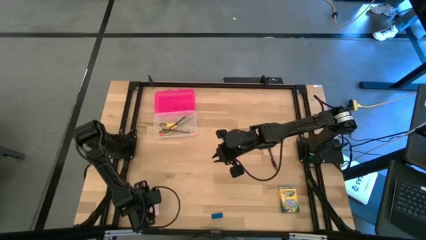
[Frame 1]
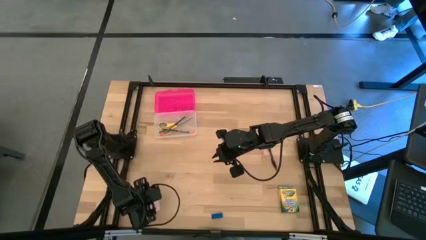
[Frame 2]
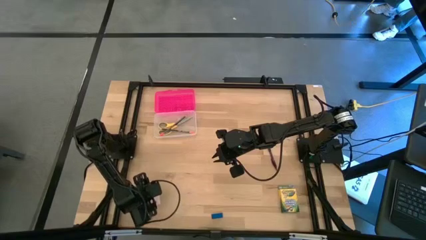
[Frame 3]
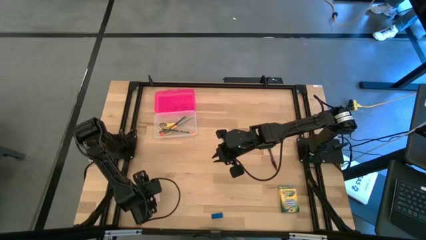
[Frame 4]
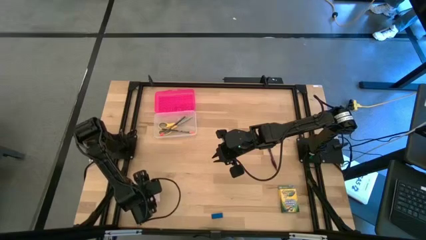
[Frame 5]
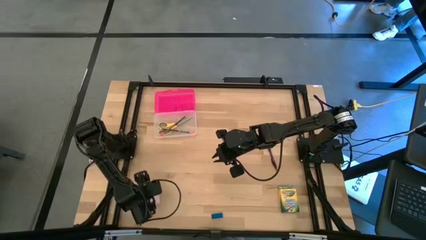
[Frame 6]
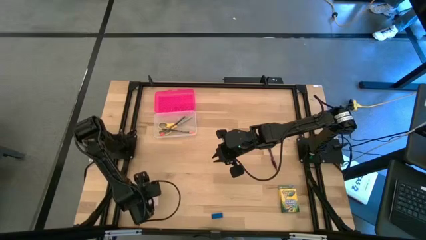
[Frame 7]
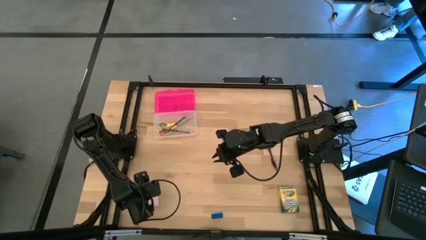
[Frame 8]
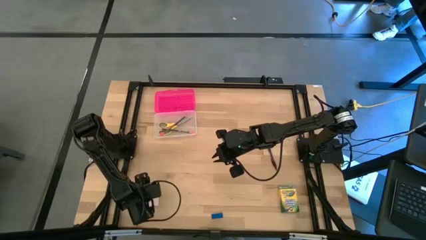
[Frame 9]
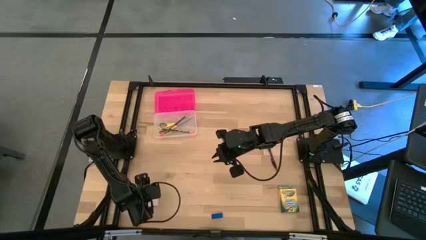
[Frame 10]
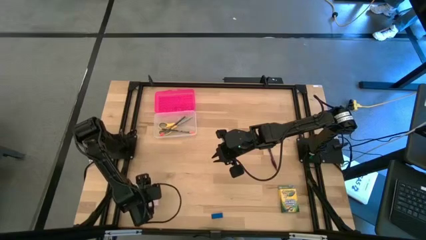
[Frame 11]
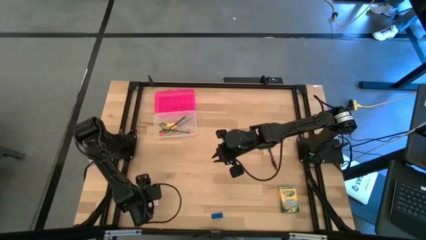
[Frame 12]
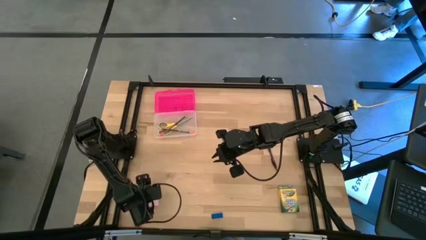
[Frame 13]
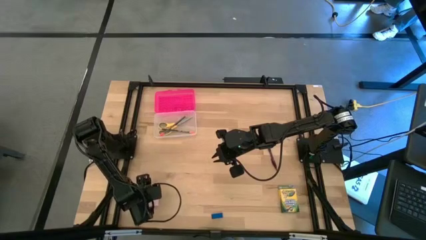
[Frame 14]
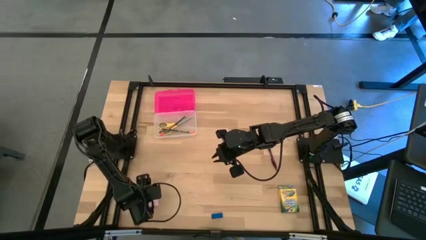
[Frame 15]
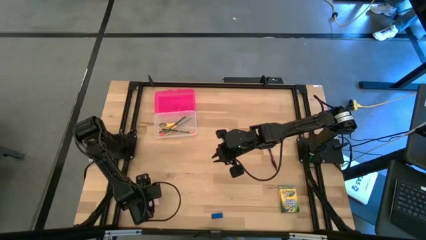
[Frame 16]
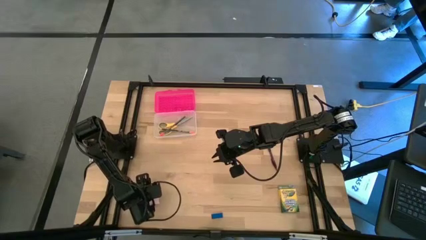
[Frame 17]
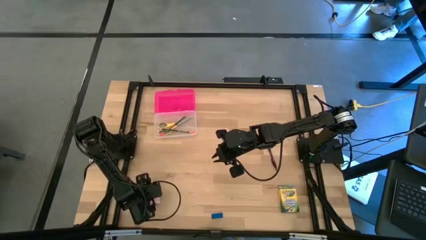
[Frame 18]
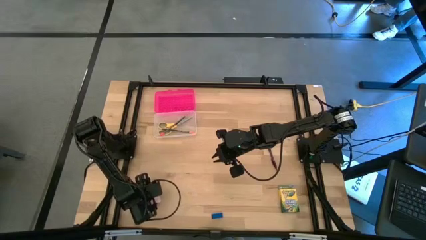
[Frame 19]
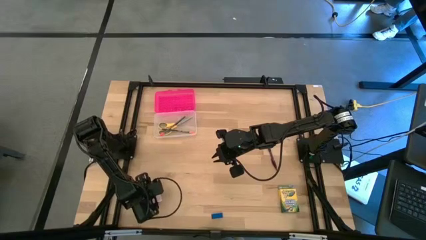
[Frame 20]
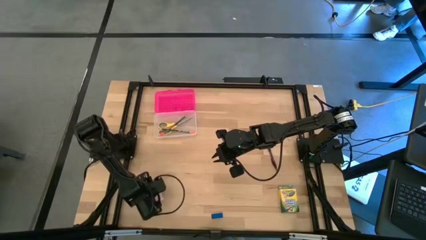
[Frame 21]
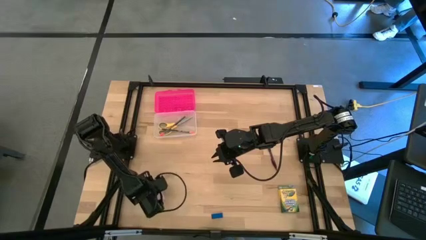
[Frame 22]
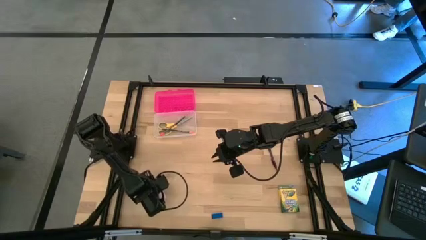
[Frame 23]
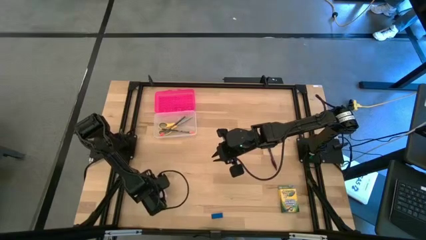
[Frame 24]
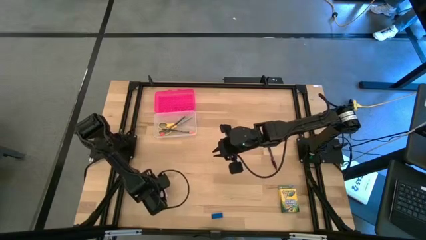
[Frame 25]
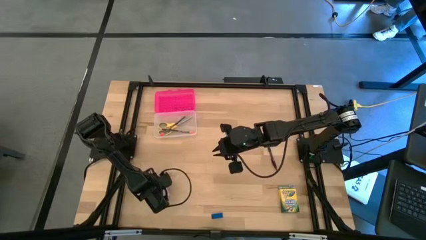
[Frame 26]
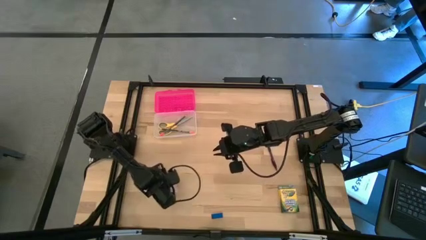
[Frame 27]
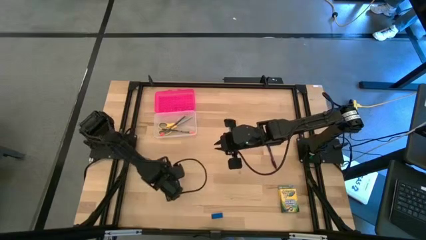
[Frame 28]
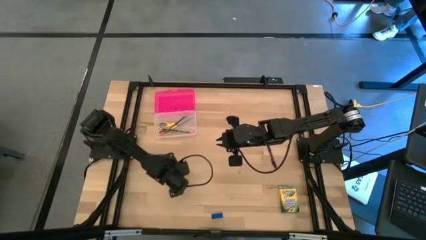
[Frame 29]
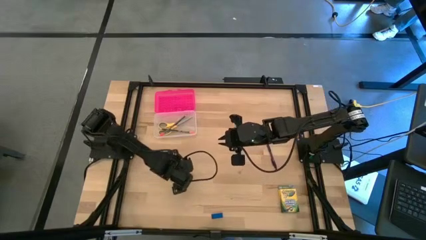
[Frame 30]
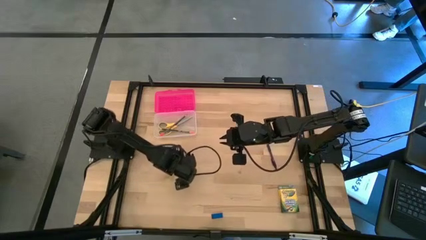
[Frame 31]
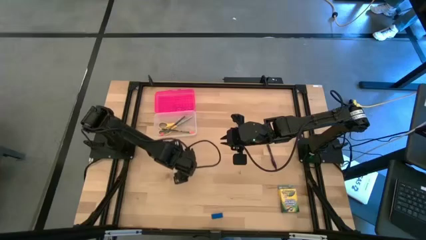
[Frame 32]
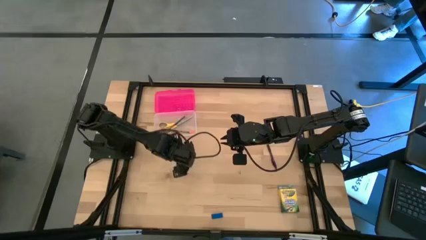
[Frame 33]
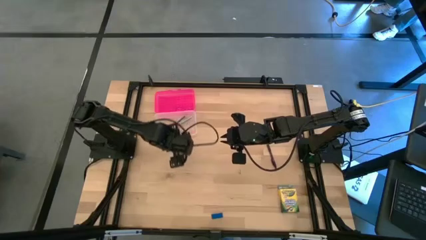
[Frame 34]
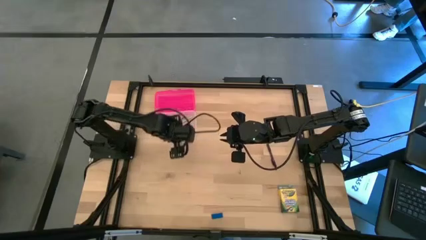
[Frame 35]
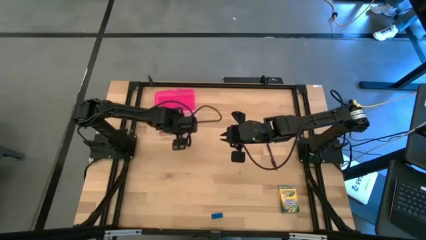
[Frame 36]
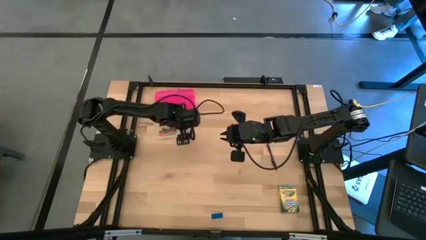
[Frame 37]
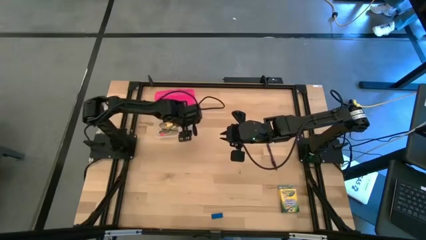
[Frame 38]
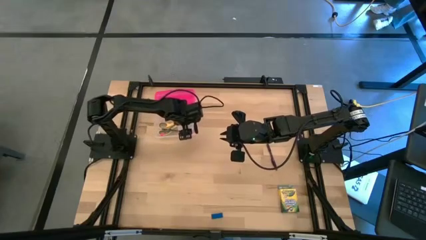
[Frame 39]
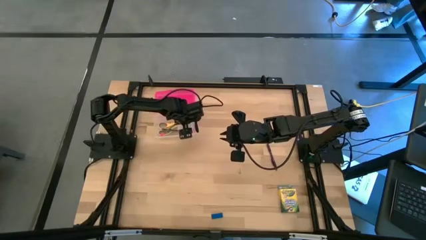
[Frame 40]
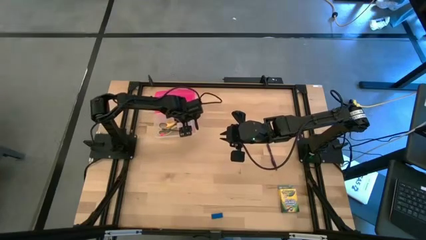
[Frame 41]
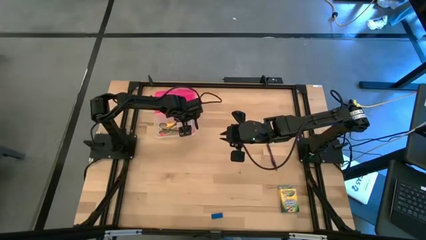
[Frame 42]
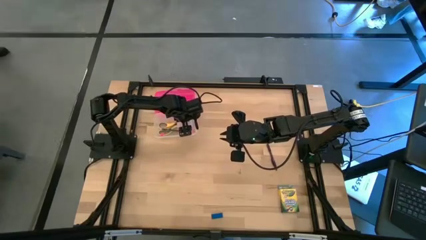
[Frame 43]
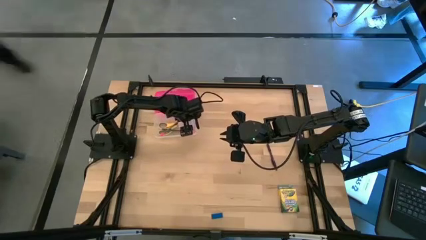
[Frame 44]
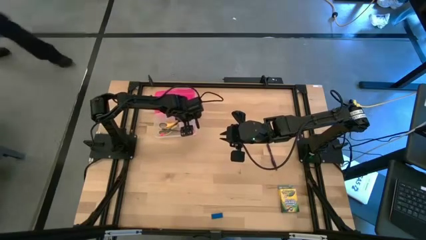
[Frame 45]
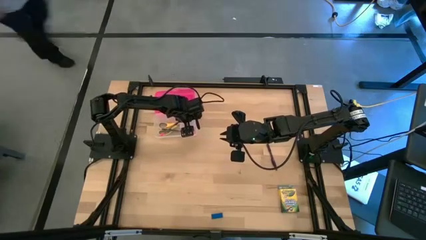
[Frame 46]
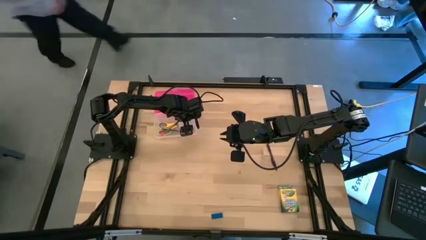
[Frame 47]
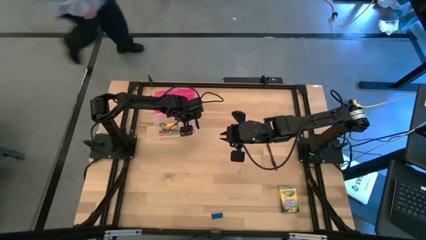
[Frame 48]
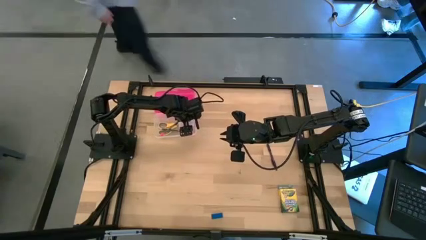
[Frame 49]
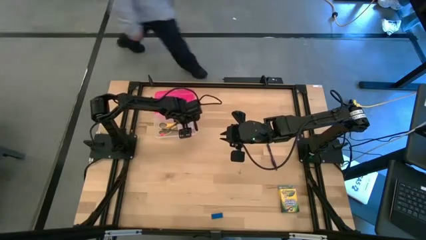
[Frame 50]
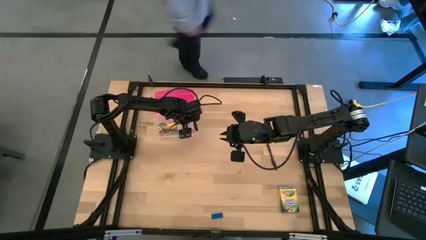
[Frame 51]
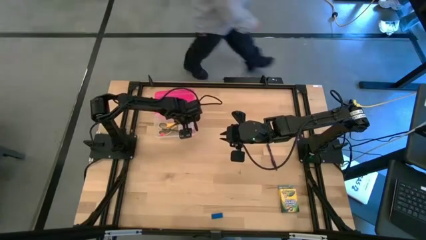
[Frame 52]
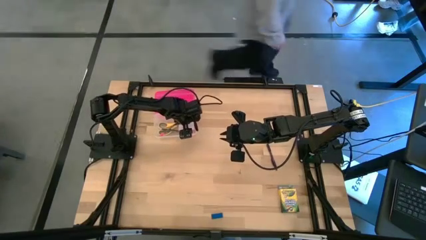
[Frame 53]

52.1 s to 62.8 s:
Task: Pack school essentials
Put the light pink sticky note into the pink supply box

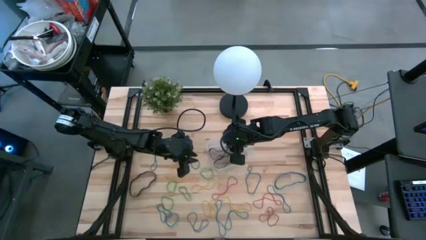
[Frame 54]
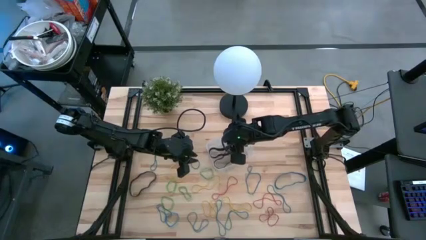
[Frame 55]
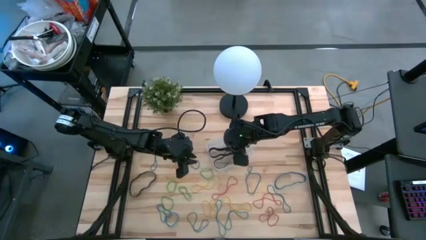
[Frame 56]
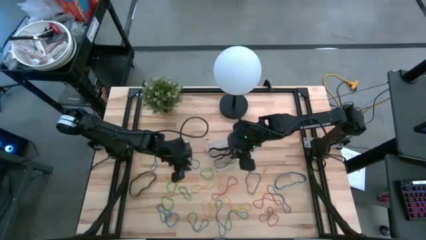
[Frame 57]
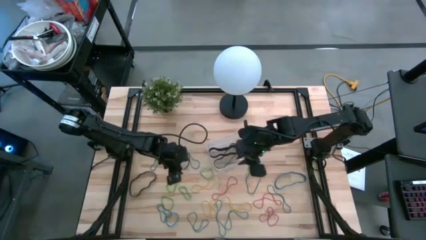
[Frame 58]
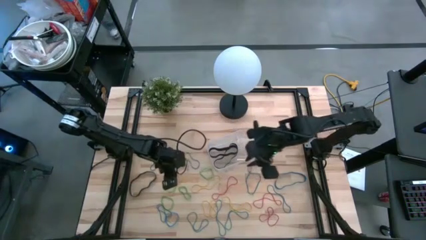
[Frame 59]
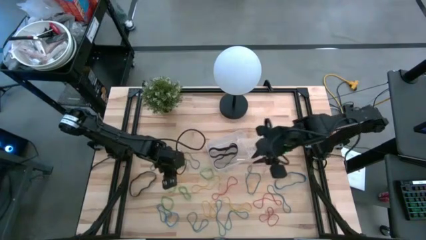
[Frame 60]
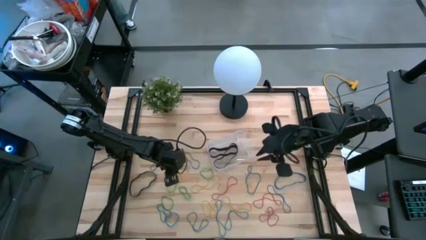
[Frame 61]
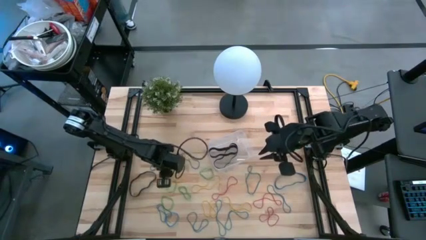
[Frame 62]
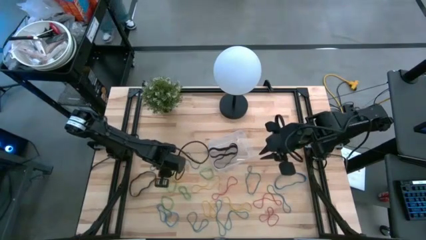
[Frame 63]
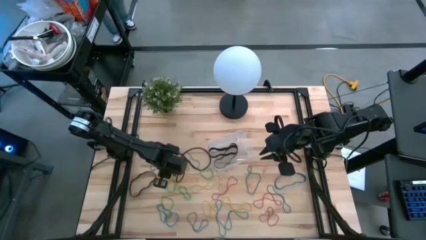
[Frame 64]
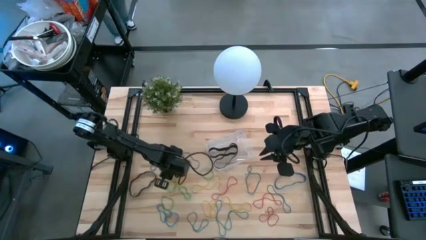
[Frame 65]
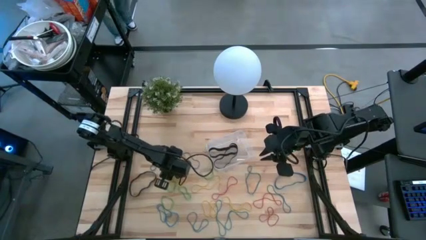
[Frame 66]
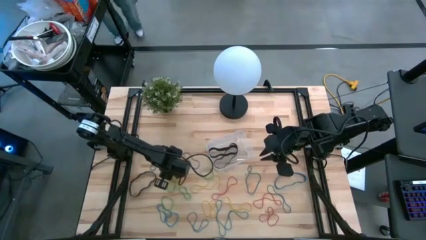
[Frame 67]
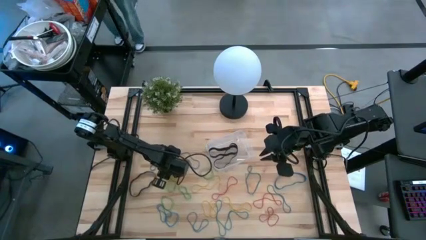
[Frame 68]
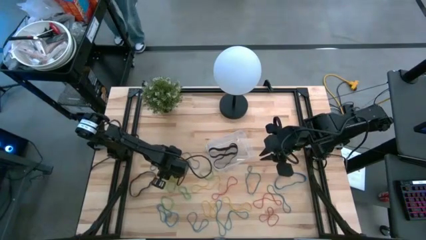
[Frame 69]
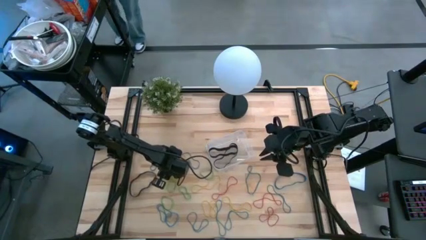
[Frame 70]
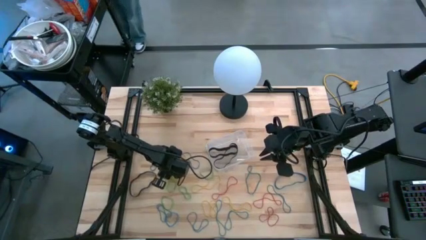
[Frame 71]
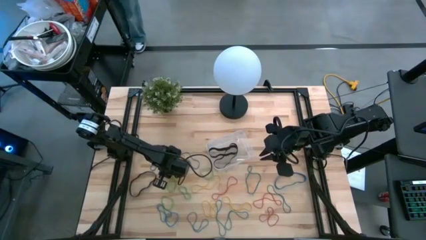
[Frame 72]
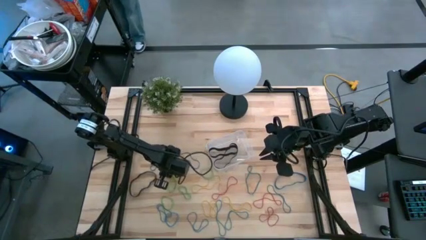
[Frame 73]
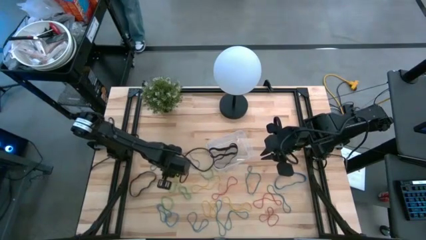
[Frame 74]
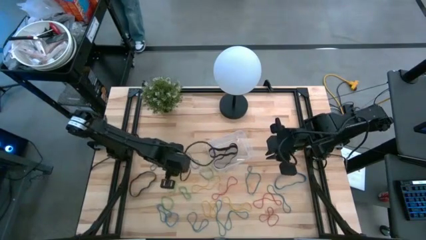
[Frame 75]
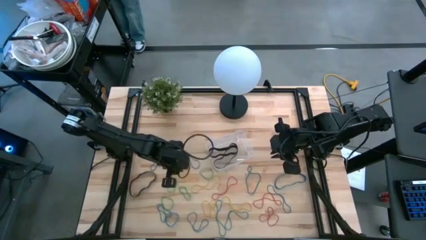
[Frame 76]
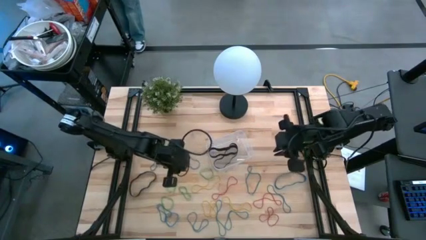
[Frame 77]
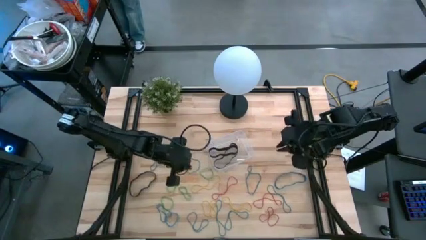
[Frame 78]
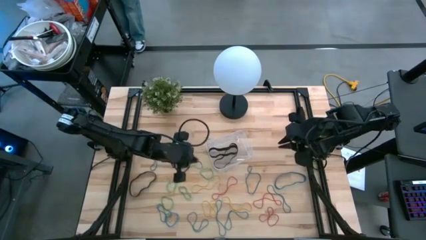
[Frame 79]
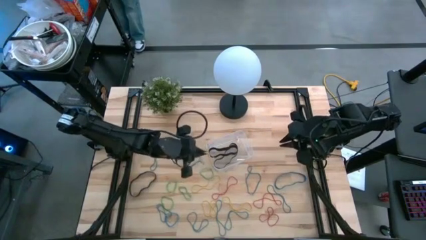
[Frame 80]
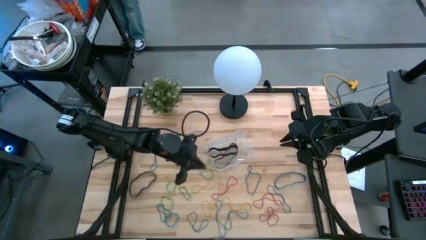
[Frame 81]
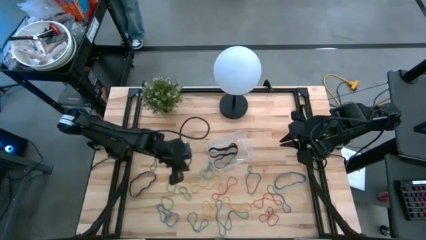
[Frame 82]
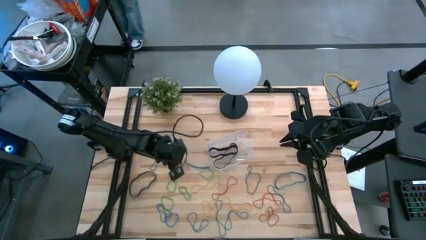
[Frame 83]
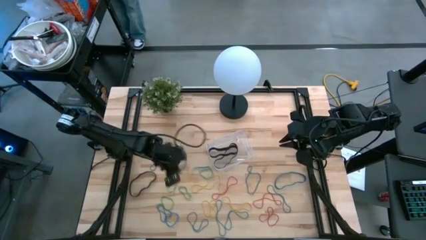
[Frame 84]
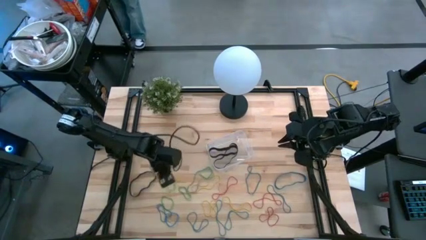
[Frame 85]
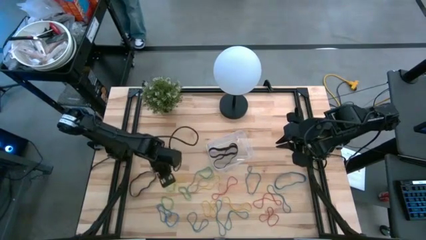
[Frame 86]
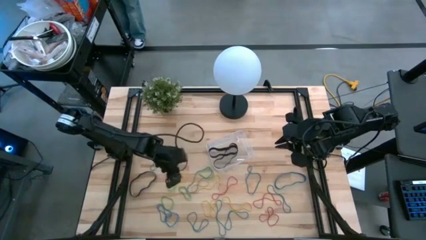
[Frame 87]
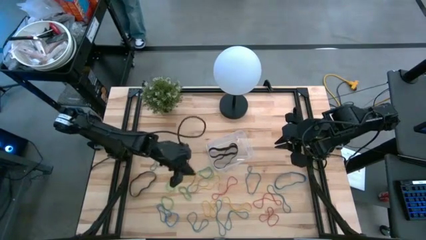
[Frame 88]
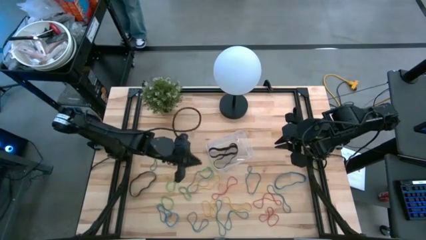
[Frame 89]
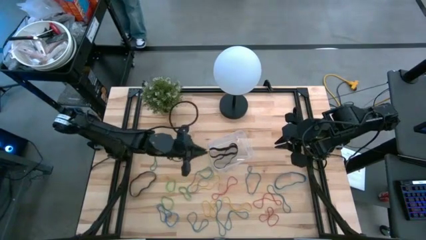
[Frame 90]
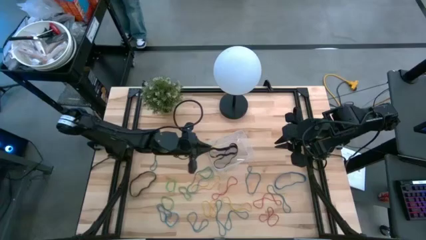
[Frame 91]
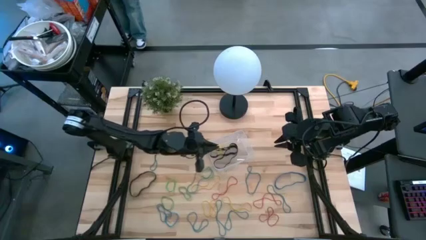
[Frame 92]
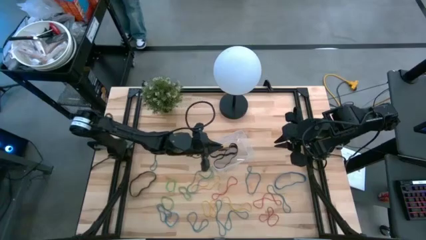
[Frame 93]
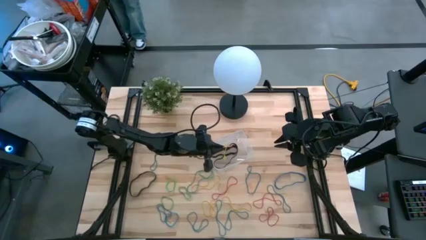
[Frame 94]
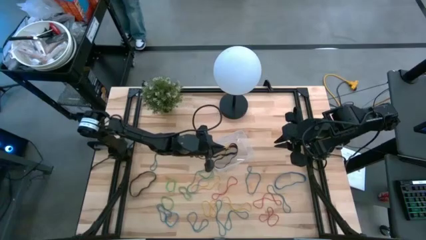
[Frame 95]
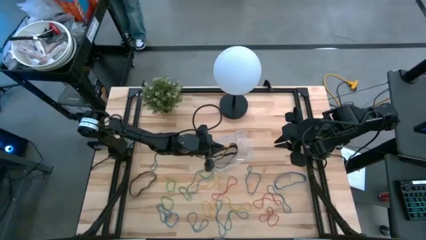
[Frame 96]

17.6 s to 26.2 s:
Task: Pick and place rubber bands into bin
Put the yellow rubber band into the transparent bin
